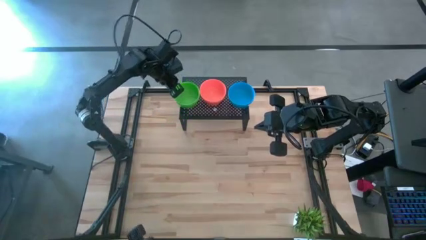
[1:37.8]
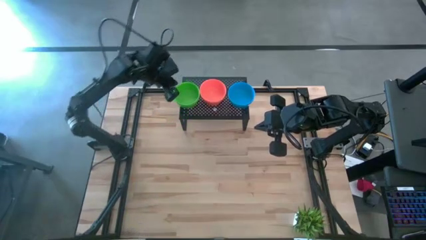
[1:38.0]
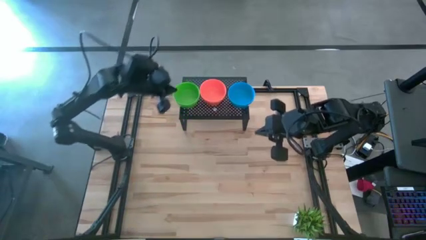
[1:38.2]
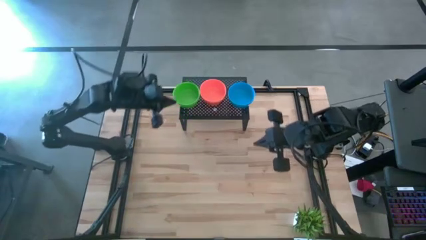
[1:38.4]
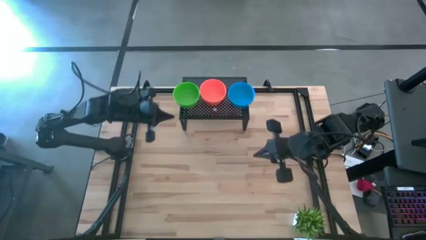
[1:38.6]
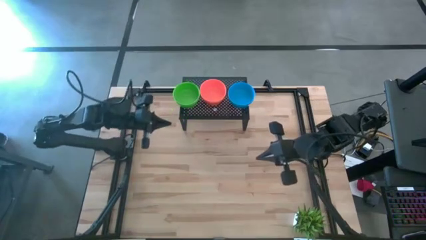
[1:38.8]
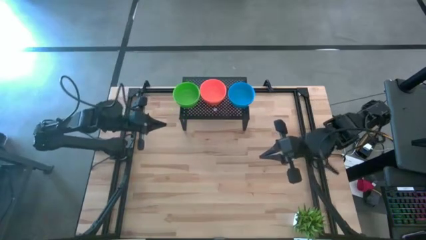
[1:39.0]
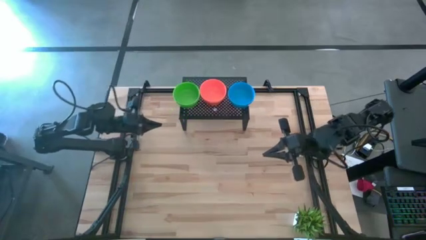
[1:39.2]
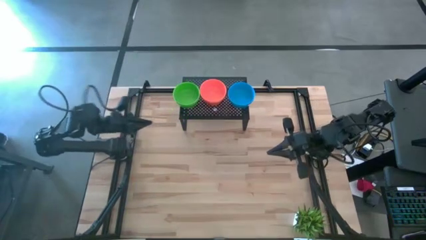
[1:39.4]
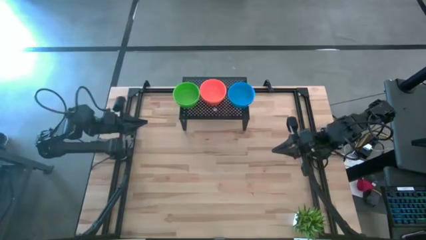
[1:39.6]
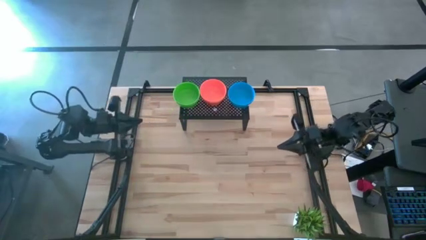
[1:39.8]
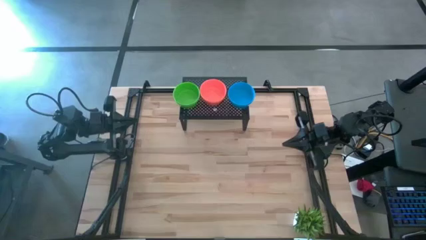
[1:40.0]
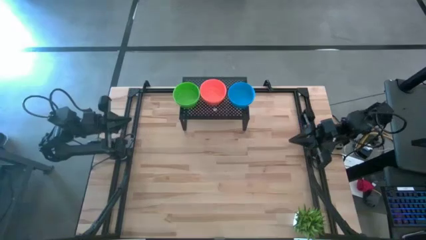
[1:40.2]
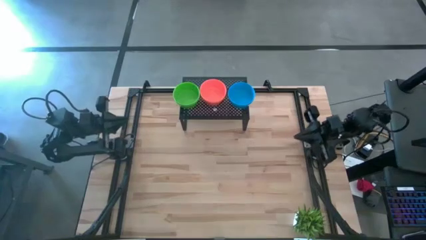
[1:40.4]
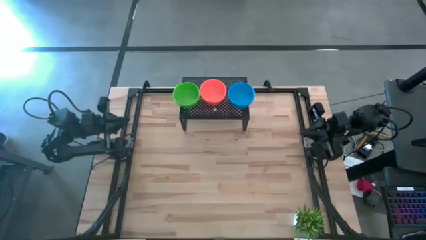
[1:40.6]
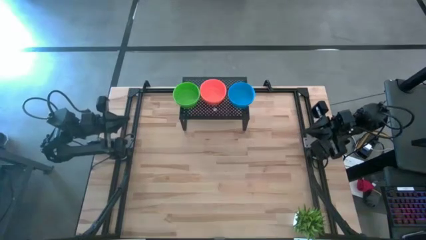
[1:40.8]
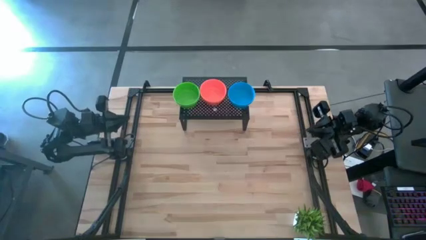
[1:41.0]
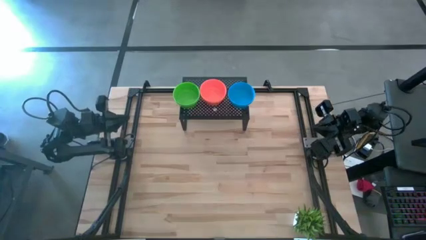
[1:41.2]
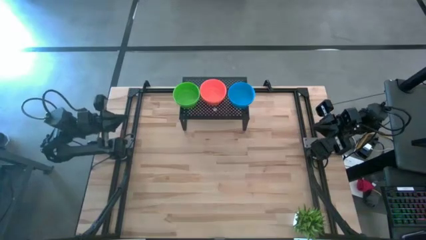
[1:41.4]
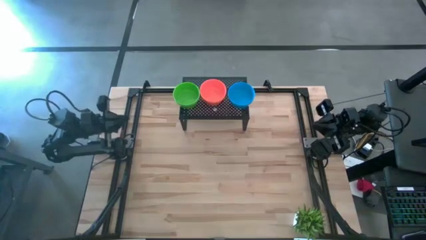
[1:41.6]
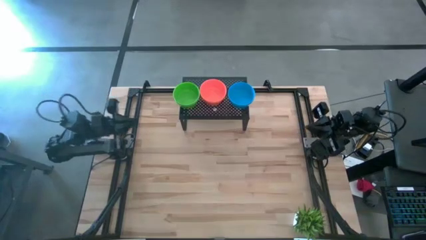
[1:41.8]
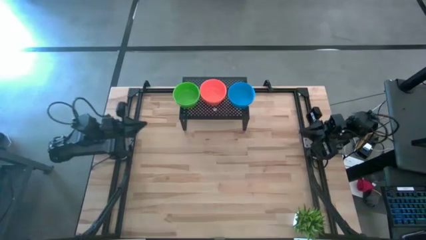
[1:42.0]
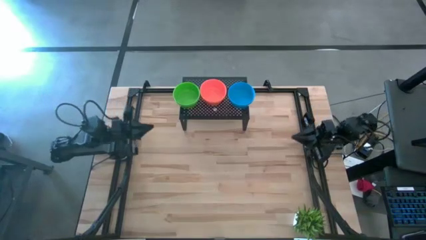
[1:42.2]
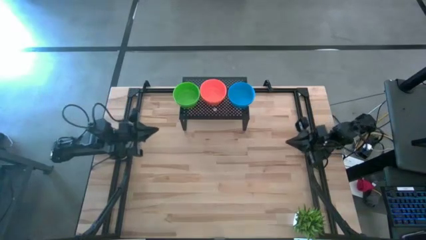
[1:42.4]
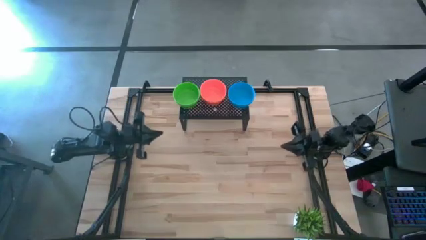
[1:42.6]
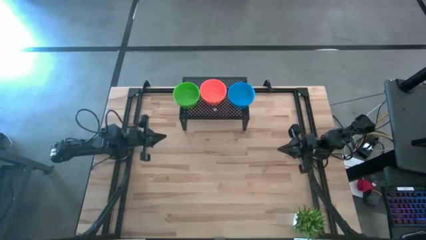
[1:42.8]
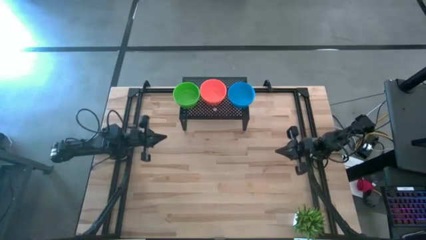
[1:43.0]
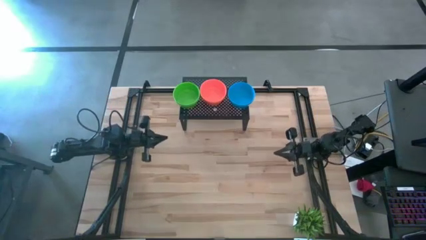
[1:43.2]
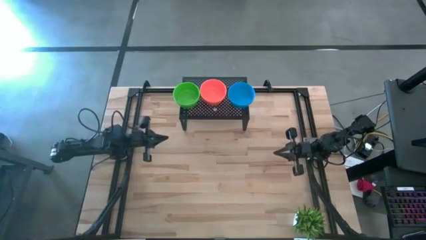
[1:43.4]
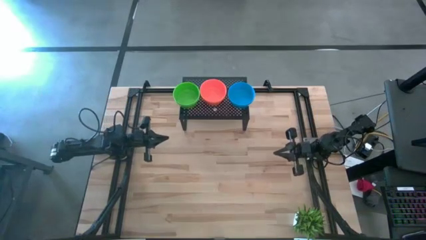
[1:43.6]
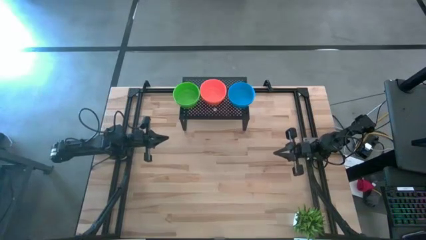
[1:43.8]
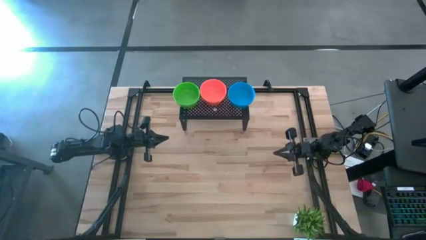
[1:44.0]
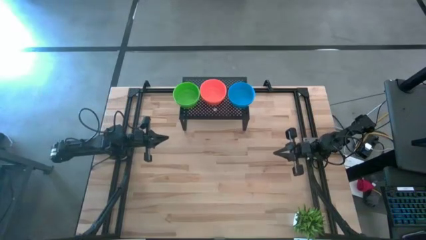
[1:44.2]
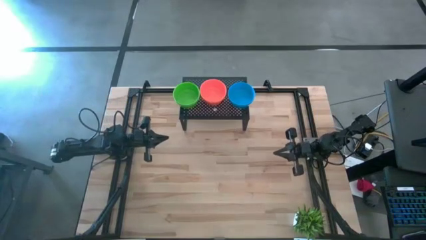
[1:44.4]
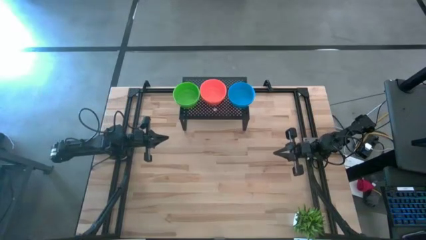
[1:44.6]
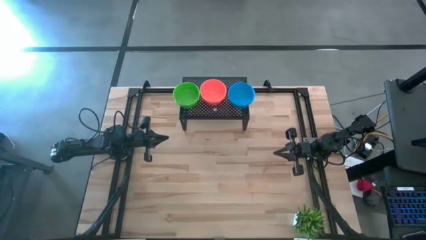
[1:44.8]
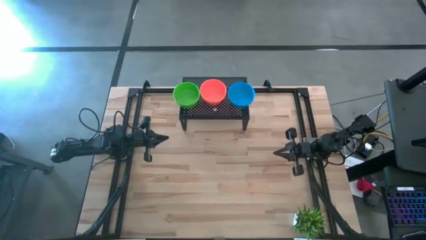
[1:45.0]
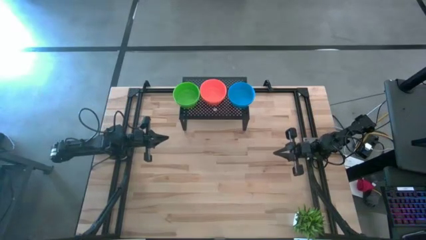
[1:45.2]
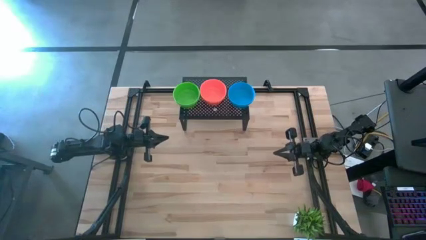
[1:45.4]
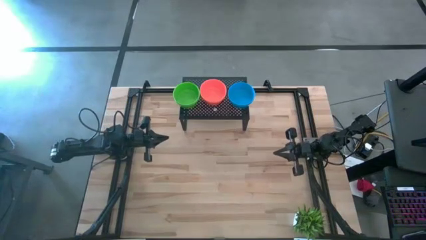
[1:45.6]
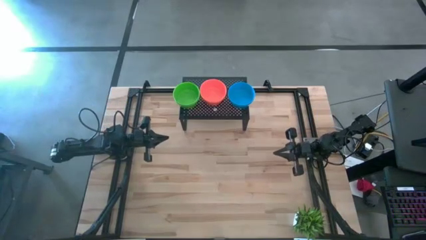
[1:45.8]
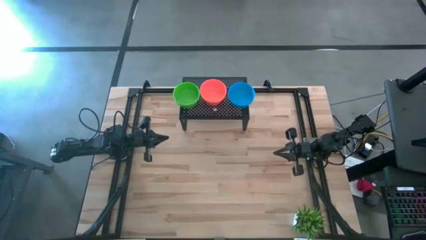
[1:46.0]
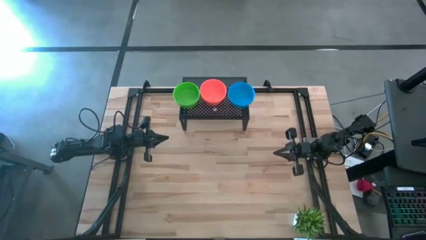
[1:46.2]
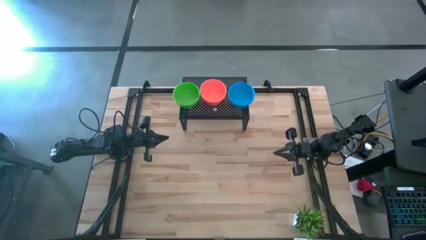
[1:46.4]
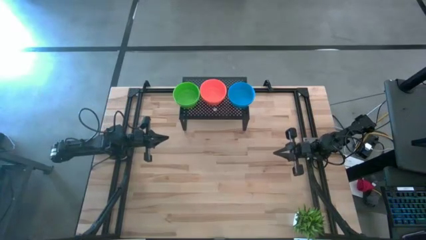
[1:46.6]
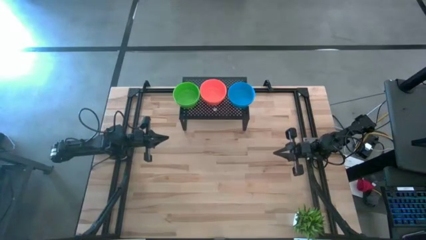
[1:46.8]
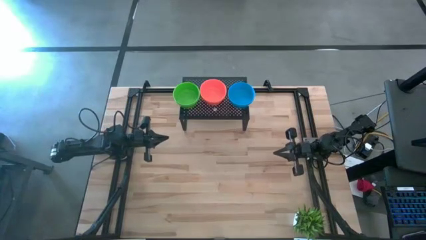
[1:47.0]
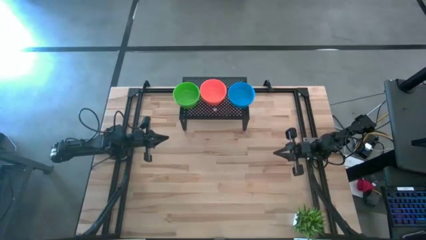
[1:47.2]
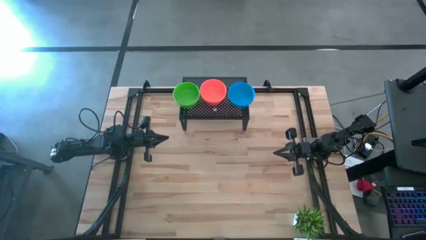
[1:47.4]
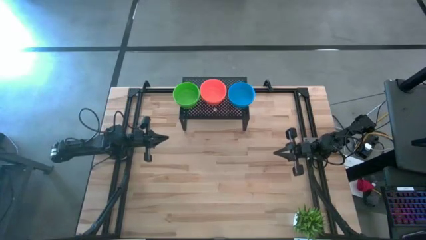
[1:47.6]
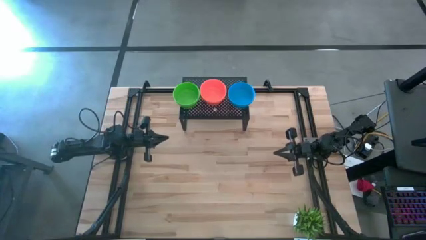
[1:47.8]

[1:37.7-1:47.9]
Task: Pick & Place Mini bowls
Return to Home Position
